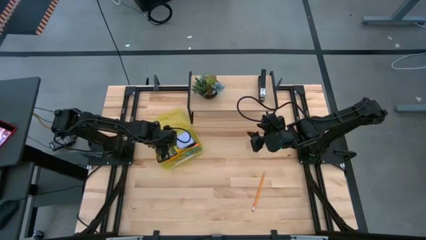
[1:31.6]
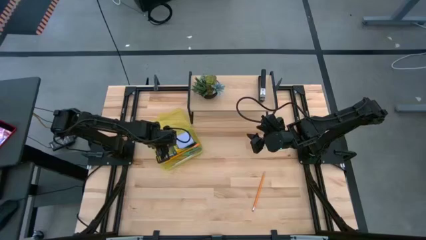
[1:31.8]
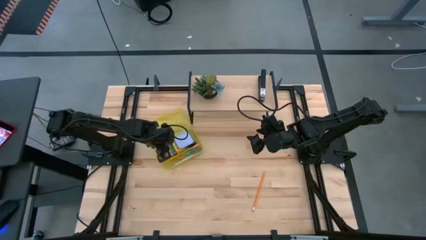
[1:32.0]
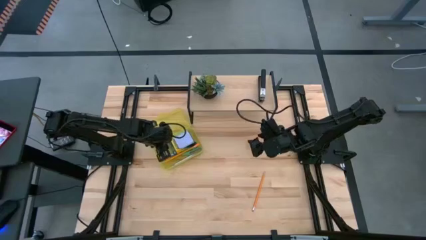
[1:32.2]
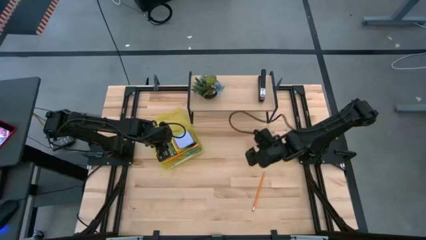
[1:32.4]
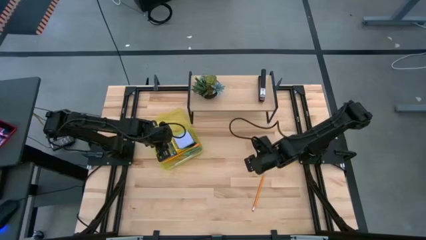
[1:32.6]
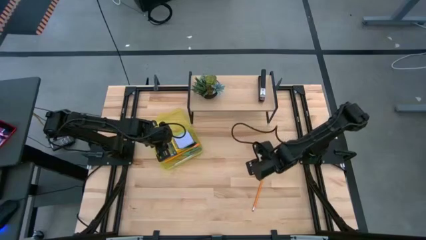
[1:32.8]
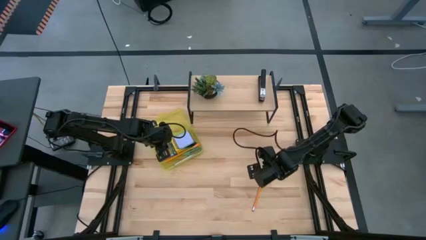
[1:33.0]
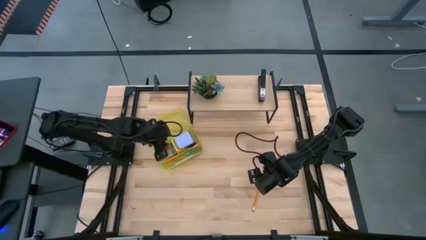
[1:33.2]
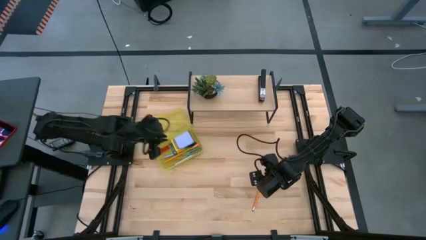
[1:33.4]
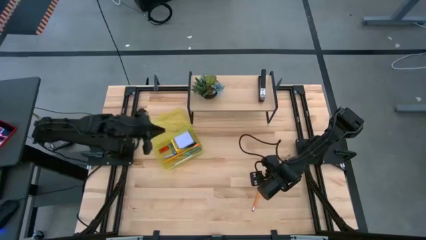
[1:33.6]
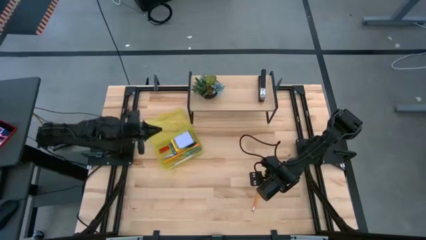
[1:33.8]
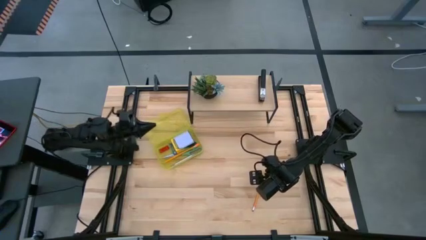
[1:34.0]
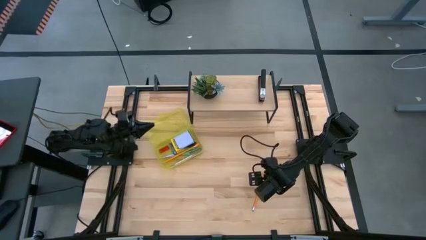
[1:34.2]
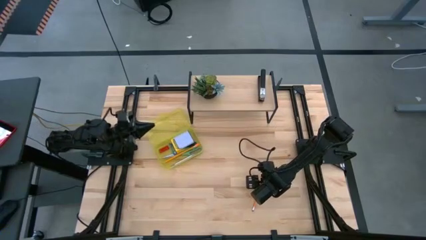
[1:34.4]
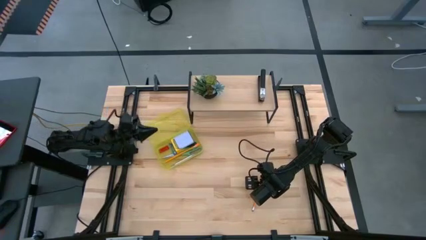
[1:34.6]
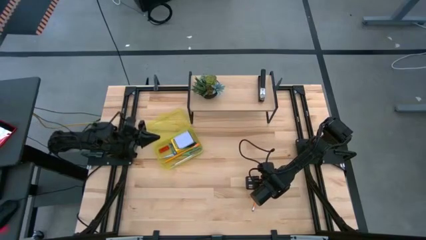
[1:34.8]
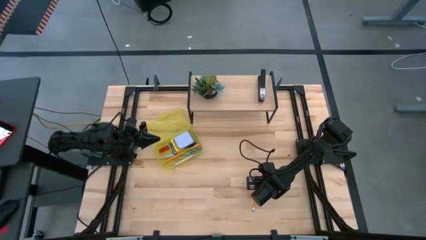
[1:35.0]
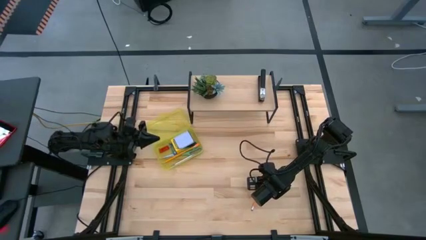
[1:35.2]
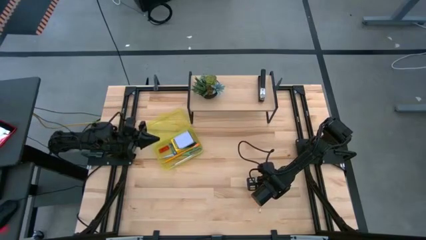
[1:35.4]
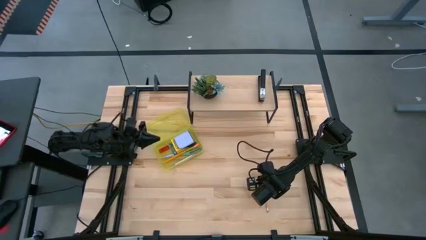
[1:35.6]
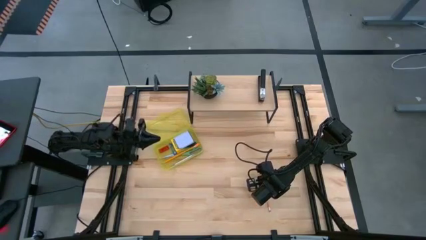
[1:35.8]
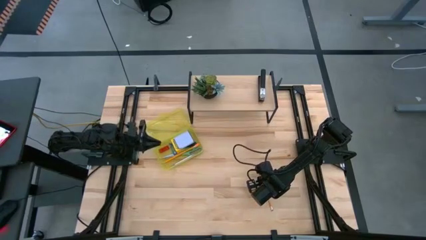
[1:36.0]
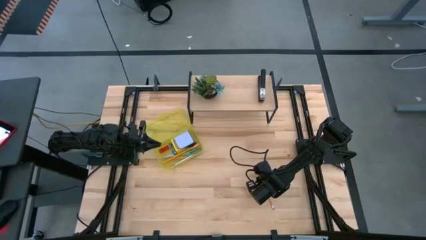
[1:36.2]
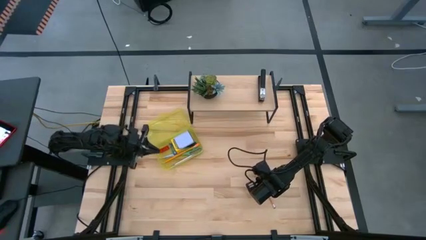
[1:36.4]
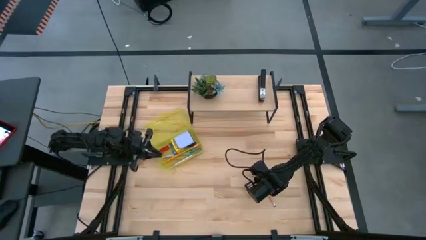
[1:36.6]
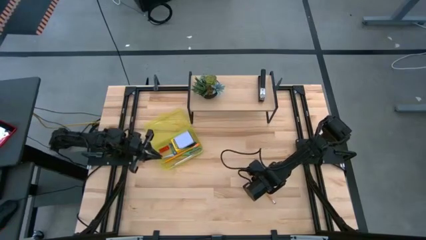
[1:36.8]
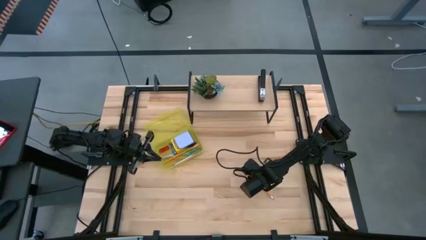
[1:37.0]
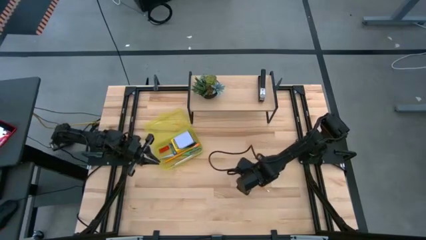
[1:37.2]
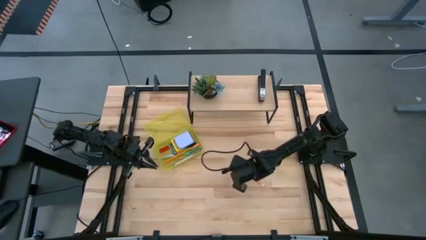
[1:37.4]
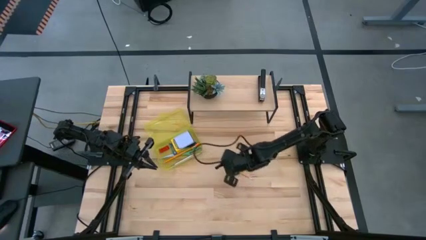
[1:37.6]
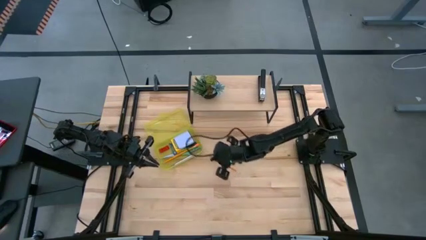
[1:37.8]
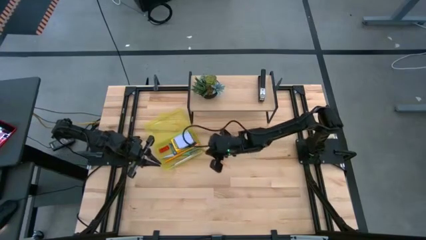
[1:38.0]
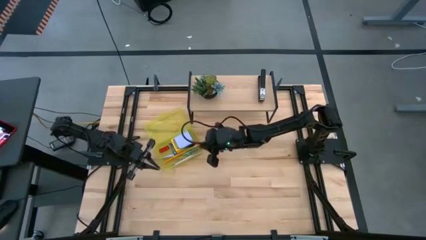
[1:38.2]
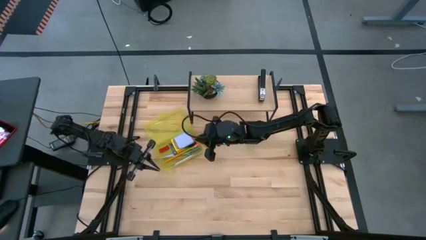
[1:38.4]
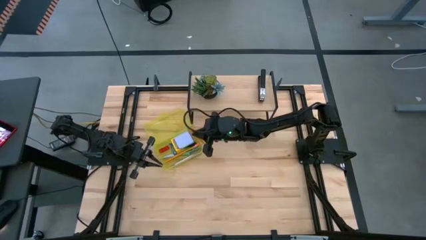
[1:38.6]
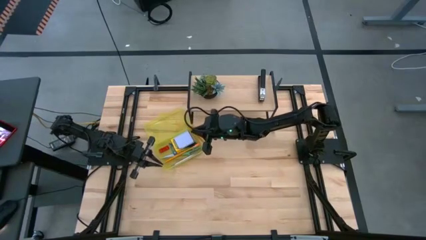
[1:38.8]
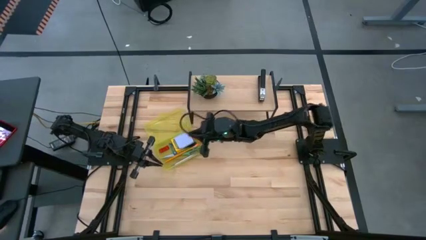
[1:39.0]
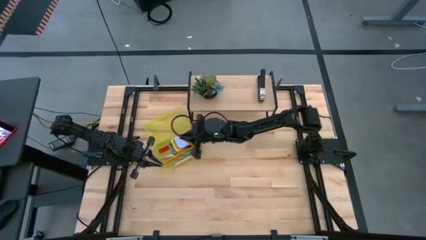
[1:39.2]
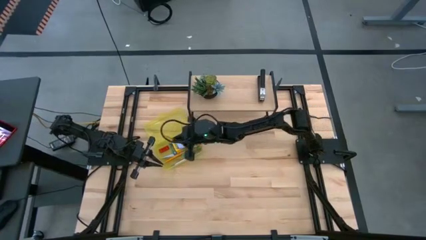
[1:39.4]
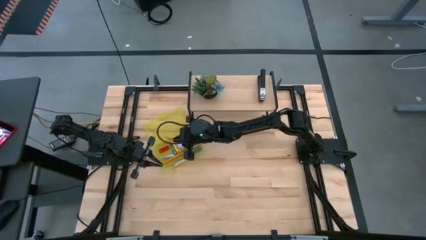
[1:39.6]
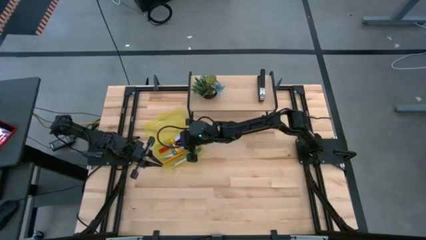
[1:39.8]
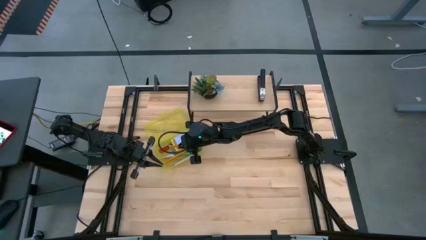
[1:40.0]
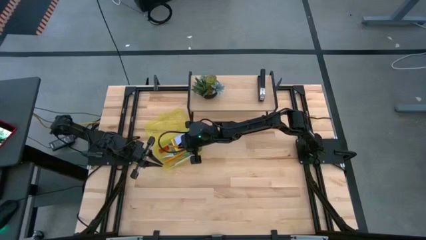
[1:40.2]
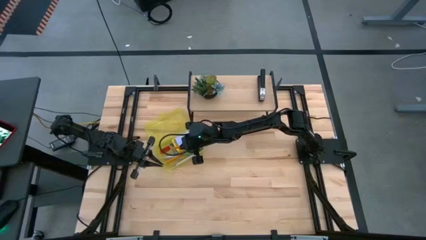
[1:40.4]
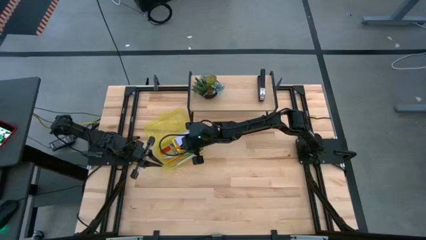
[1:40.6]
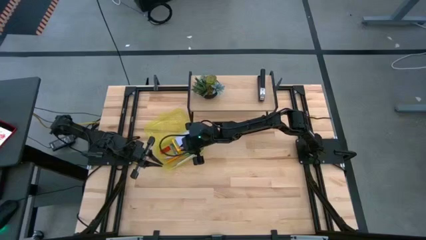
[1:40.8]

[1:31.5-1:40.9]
Task: Pack school essentials
Put the orange pencil into the yellow supply box

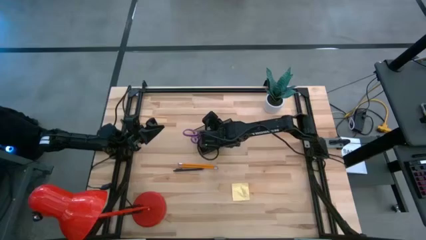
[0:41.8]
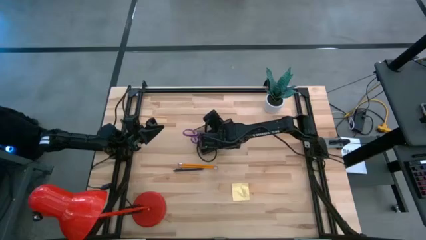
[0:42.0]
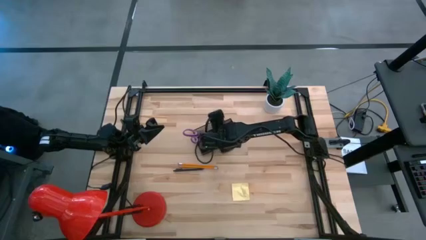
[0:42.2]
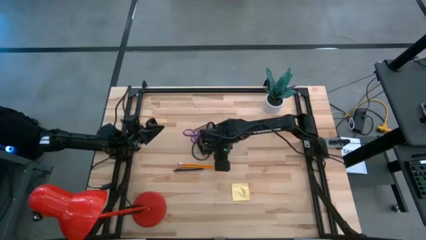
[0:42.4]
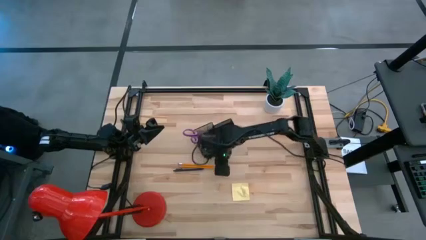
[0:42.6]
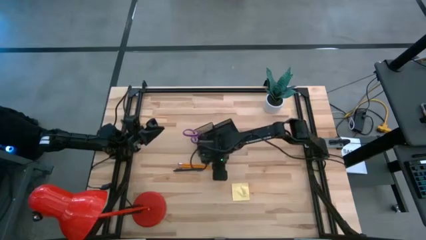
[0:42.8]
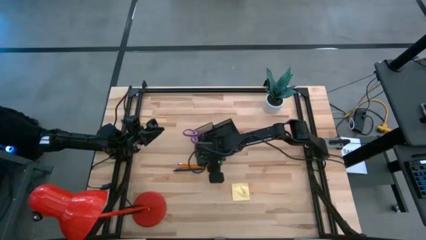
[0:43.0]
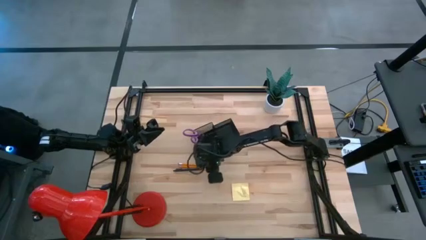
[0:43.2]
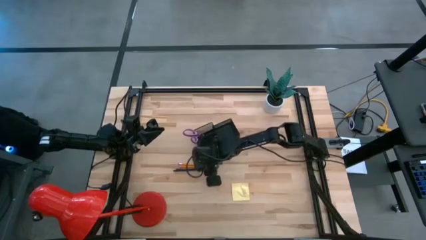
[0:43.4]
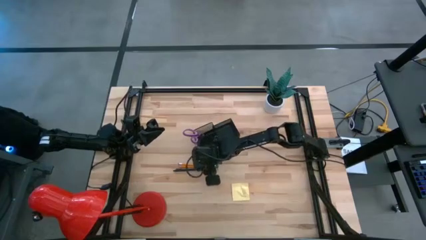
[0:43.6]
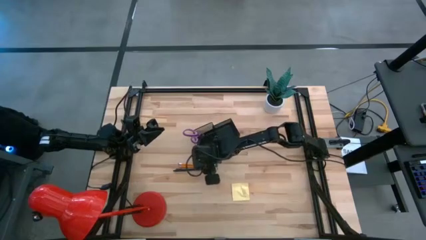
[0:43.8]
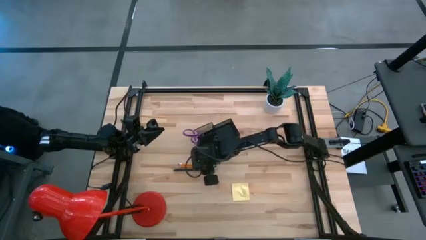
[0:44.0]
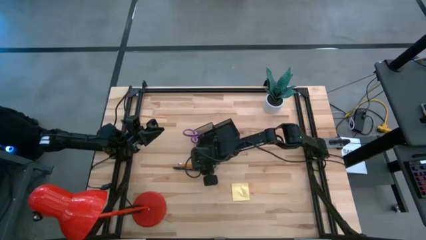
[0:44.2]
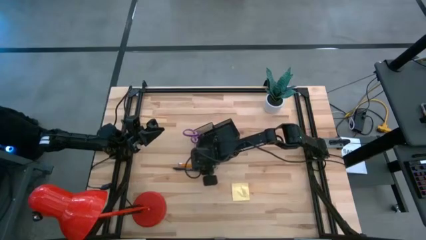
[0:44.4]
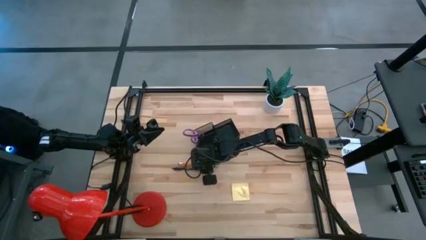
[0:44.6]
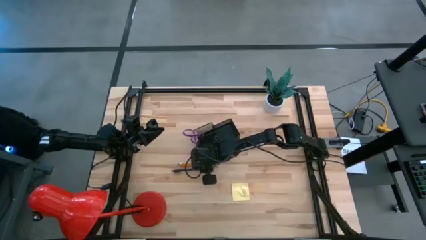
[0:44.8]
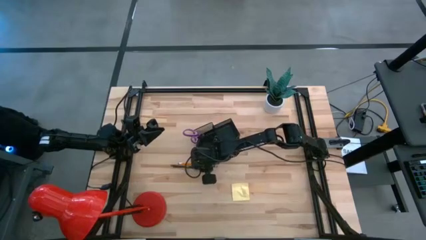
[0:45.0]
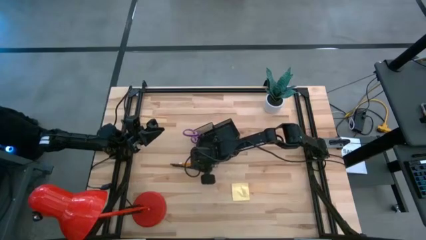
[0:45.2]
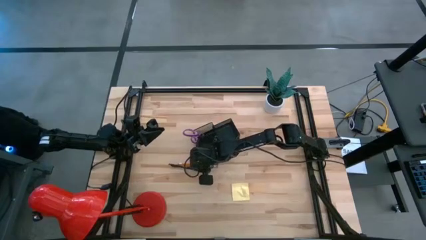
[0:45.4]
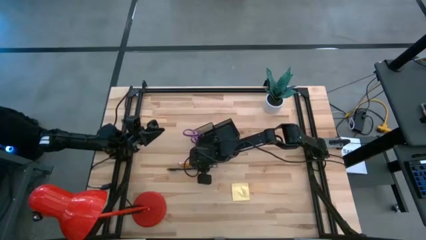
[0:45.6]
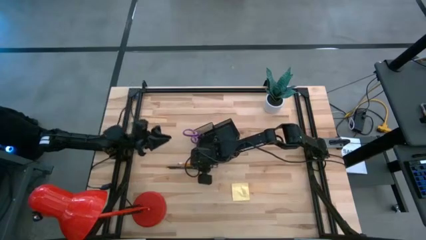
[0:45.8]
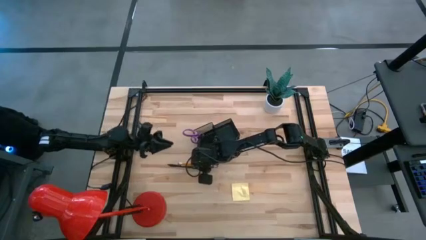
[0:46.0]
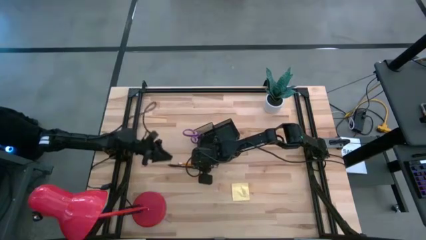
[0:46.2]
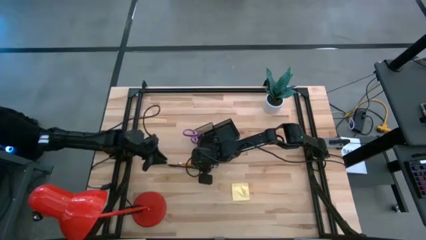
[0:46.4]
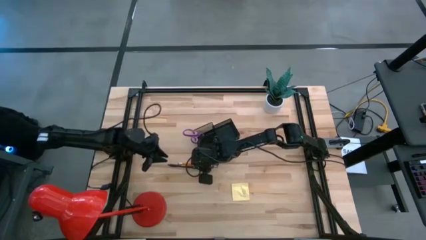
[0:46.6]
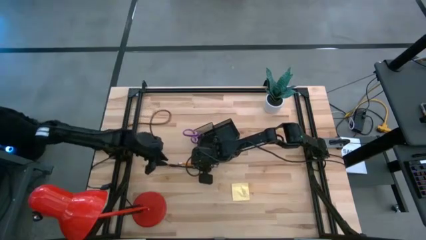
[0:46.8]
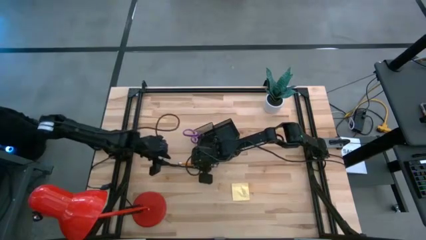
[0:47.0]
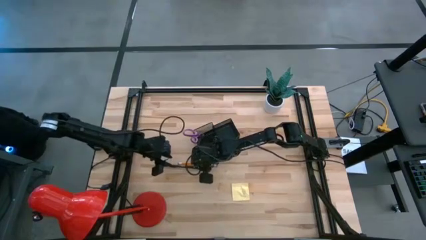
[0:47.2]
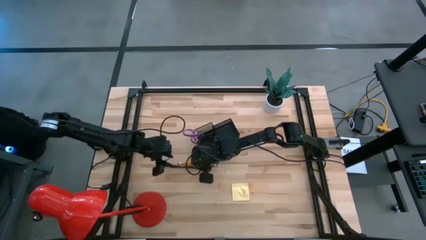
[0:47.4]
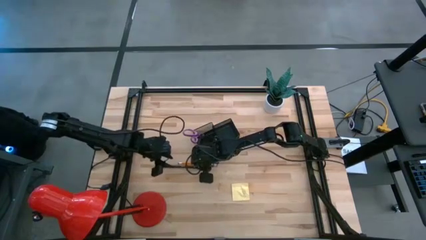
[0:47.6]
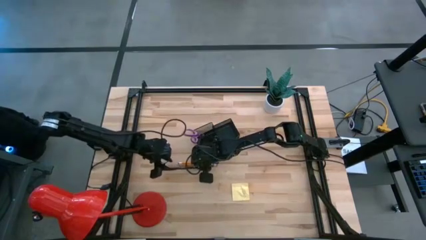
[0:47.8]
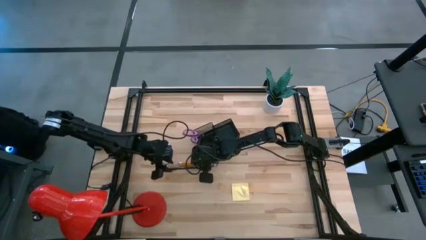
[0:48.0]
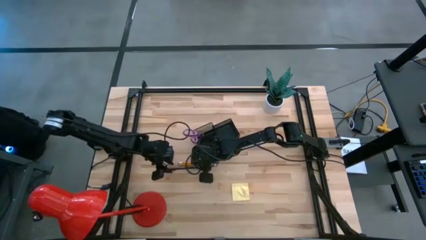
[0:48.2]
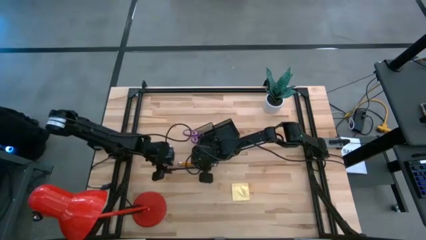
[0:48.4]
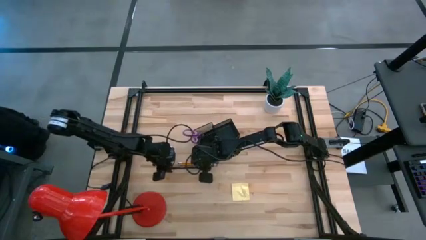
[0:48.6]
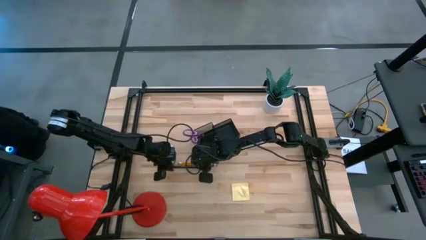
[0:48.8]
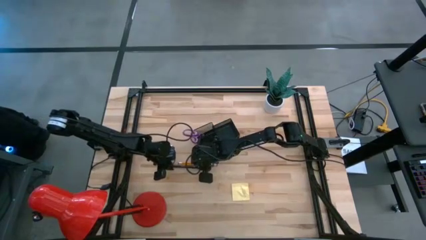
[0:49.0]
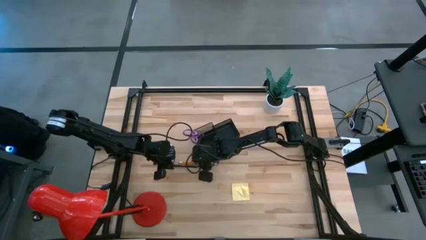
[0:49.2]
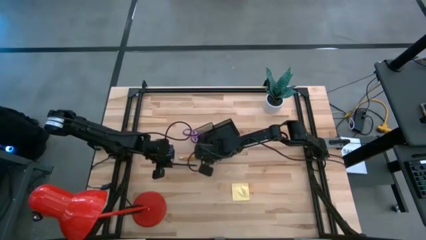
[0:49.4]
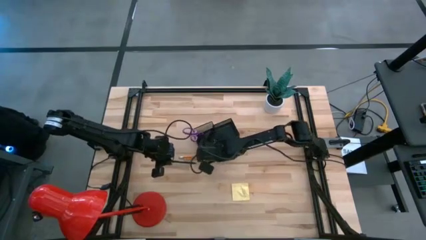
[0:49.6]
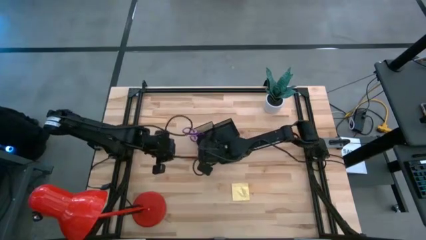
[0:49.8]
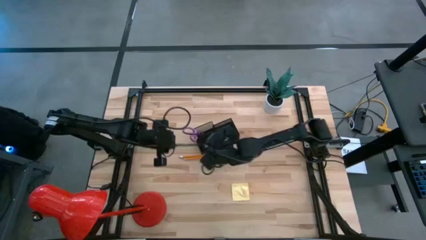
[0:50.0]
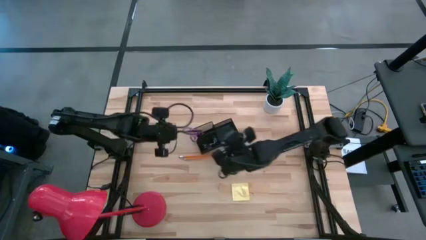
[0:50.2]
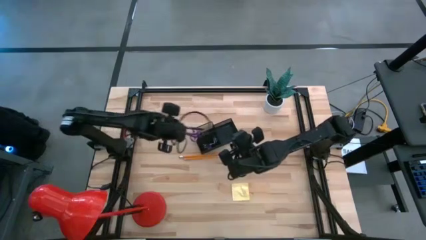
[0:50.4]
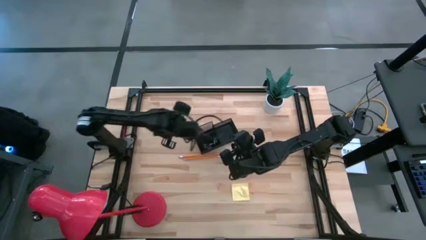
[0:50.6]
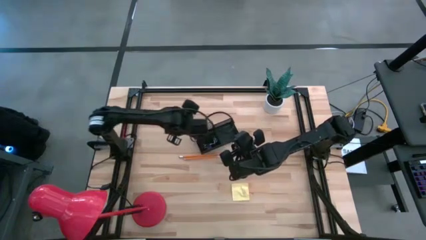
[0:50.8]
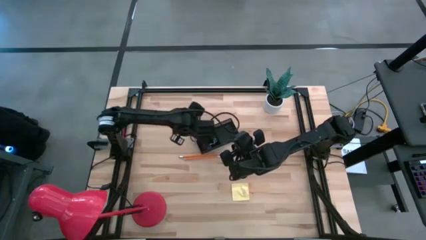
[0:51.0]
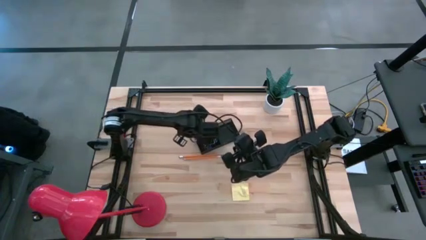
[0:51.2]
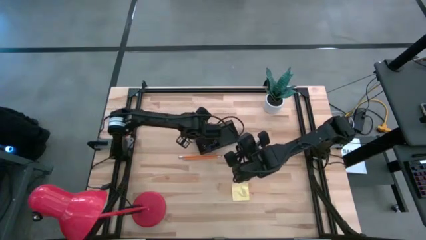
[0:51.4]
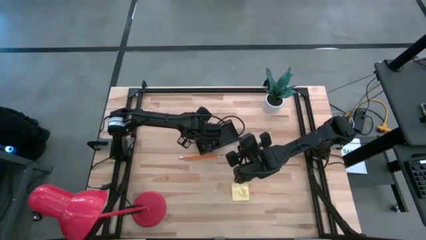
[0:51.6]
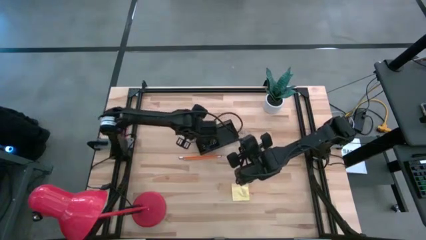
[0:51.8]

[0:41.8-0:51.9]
Task: Pick and place office supplies into organizer
Put the black ballpen into the black desk organizer
